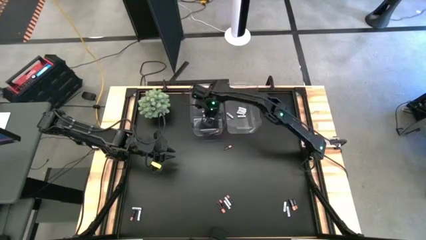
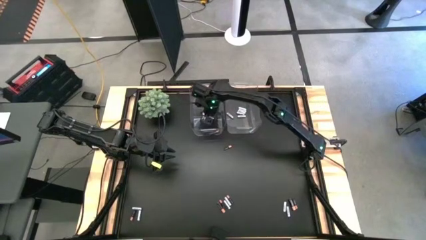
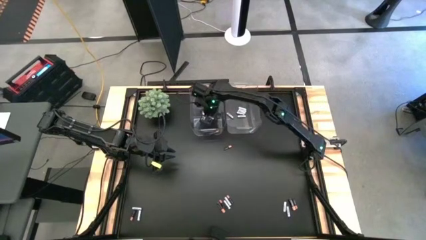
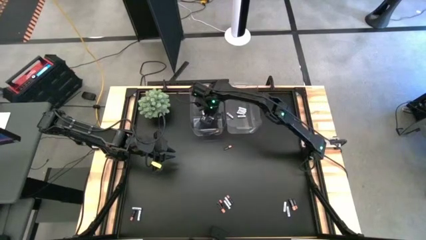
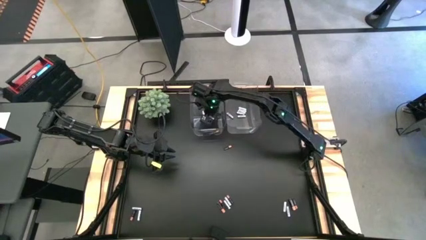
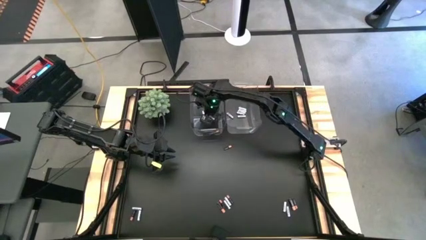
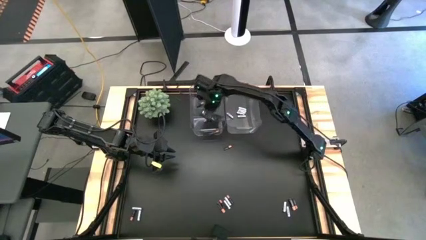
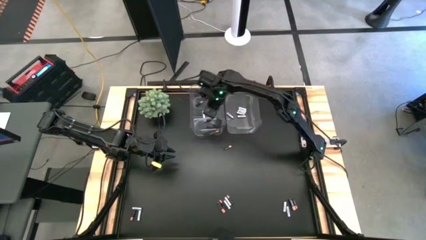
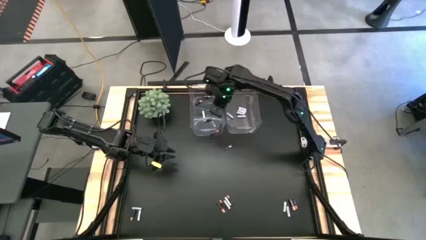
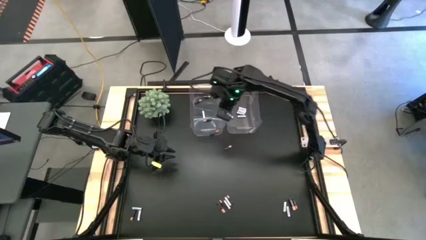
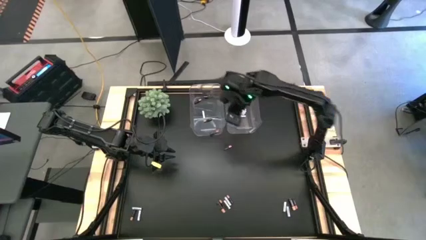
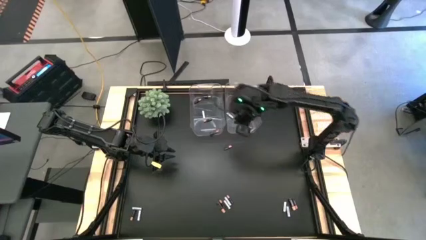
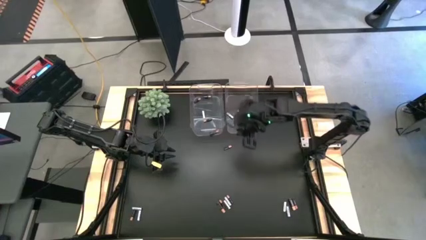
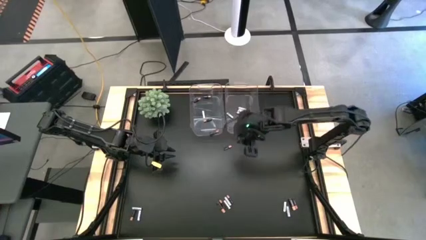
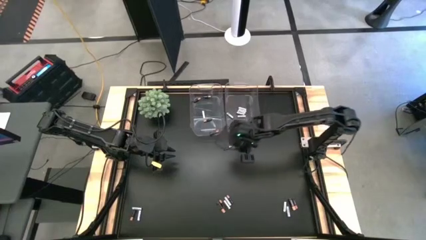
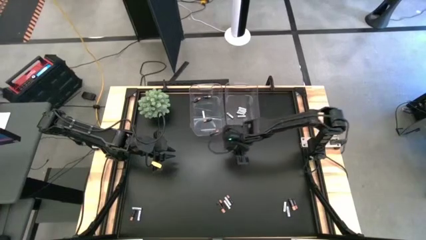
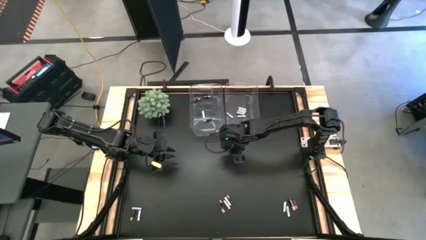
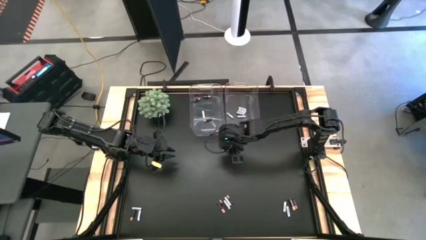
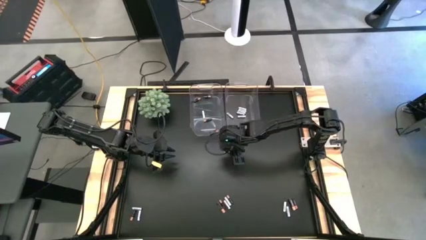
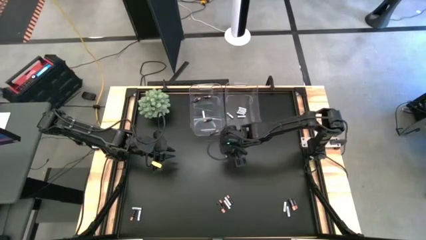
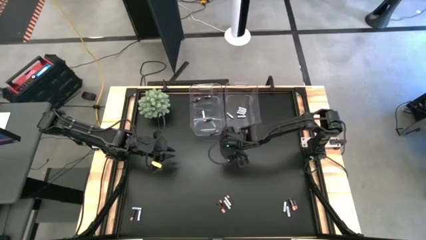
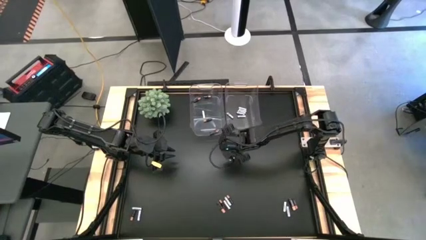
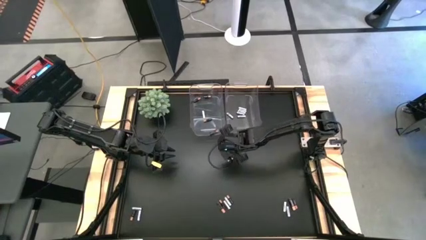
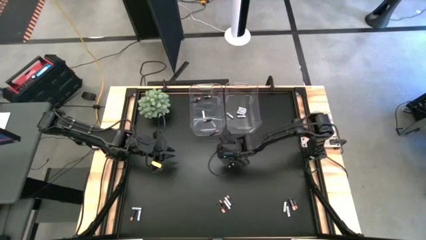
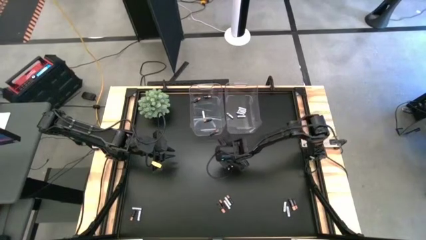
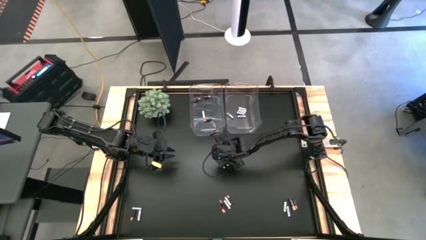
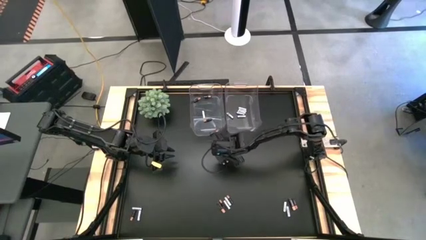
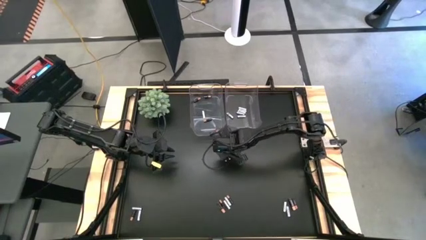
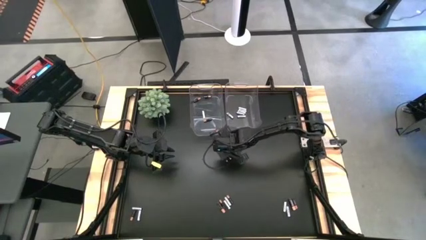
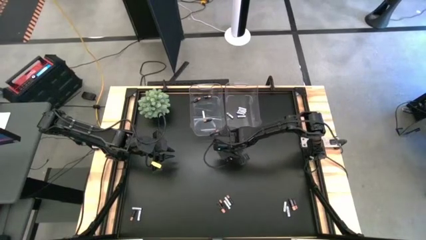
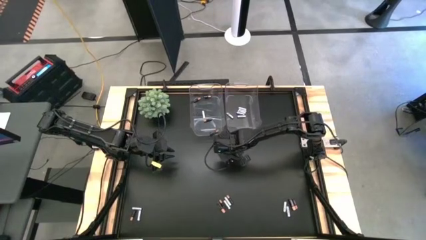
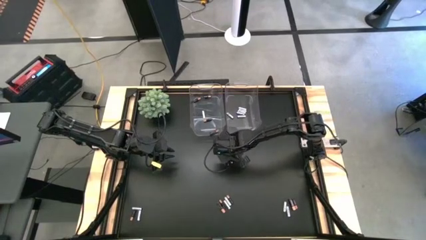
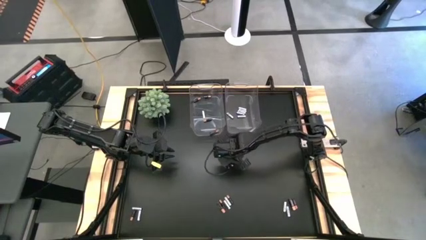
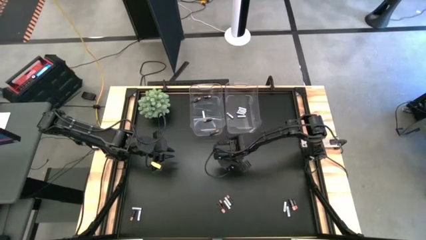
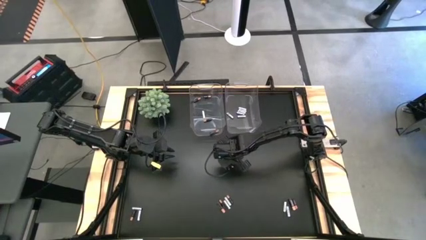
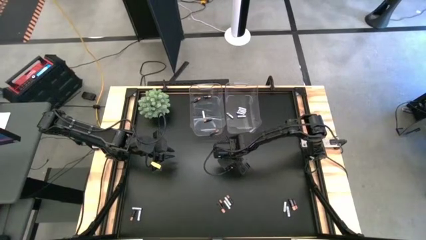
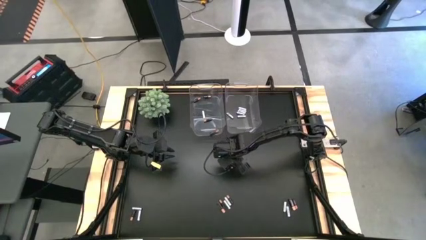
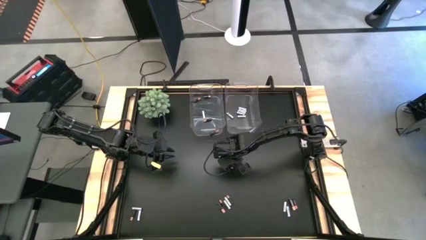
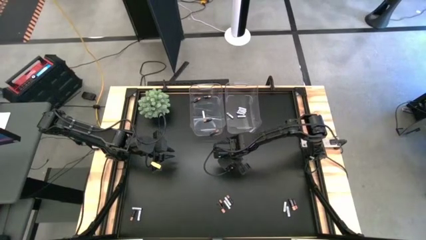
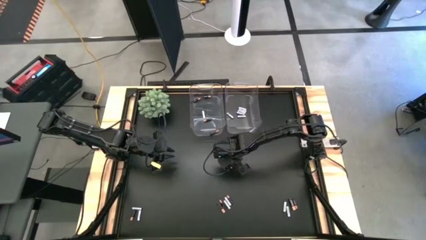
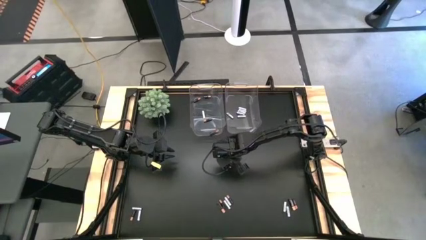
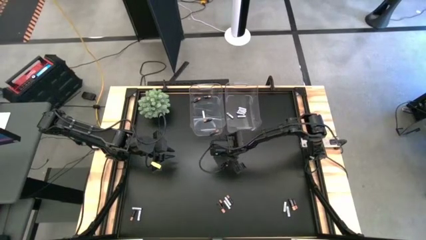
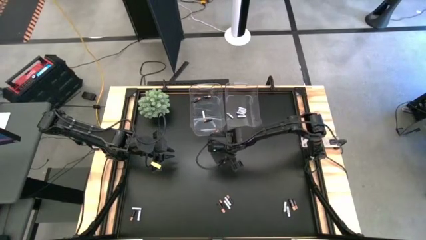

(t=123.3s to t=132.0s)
Task: Sort batteries
Put the small black battery into the left transparent bin

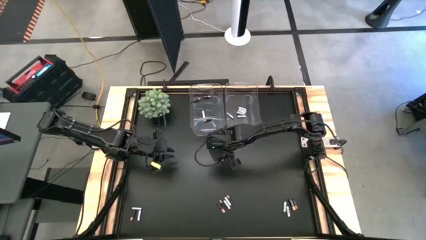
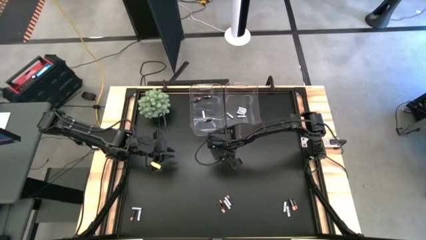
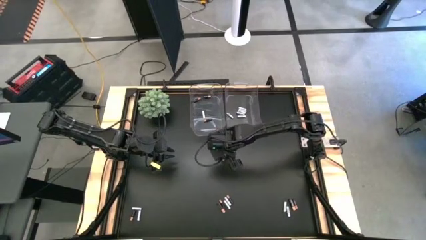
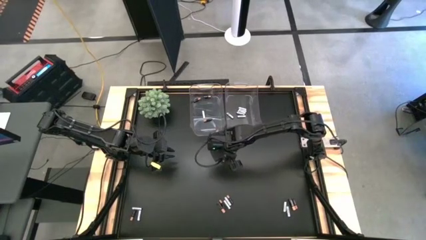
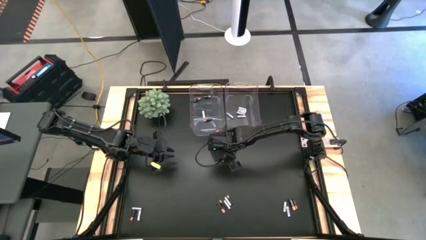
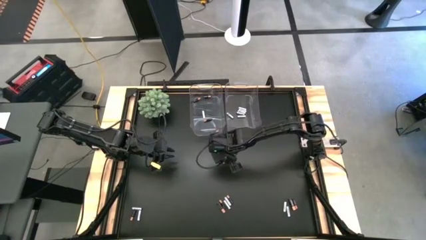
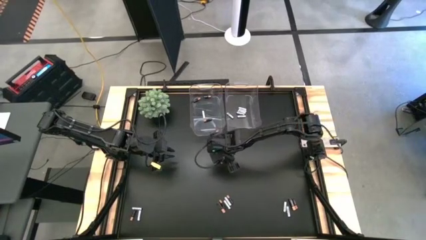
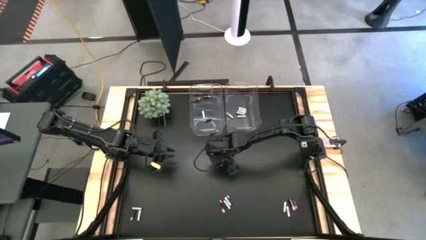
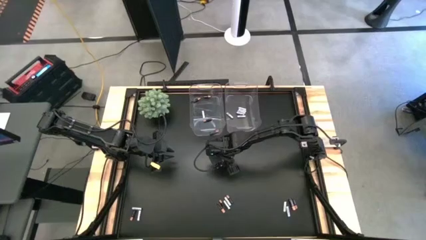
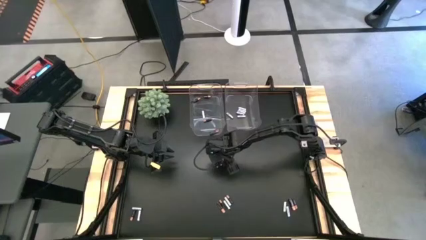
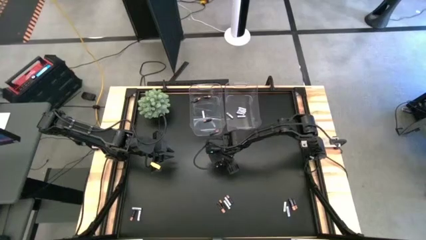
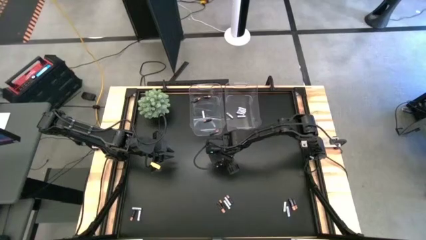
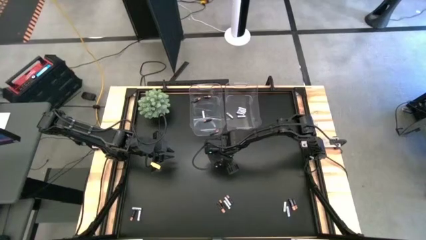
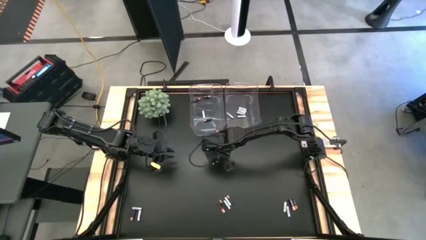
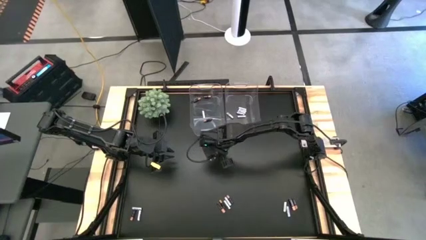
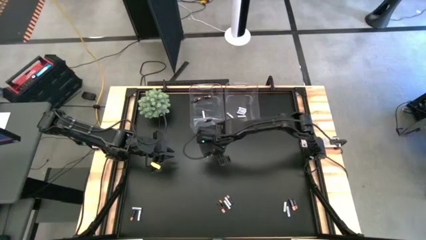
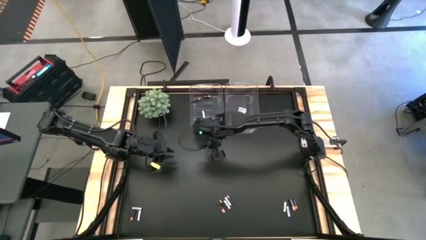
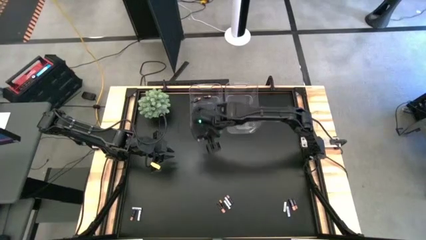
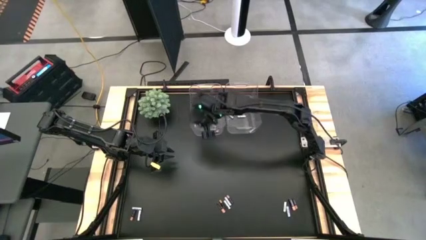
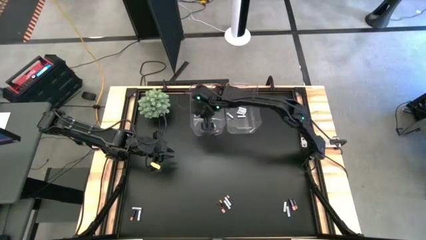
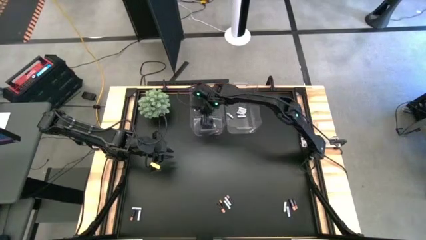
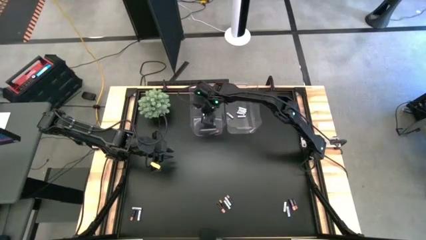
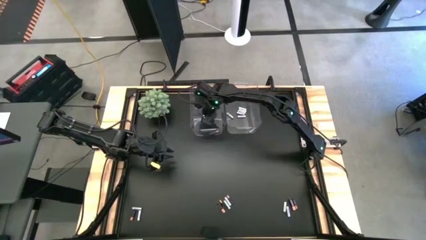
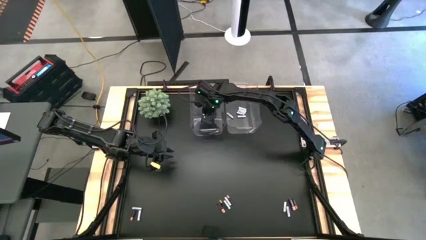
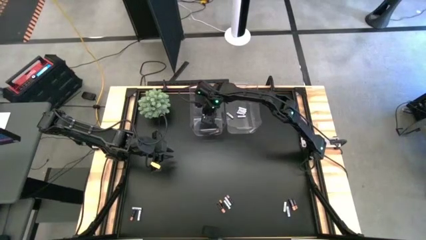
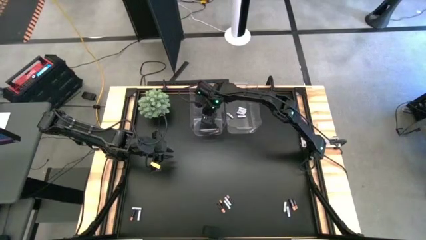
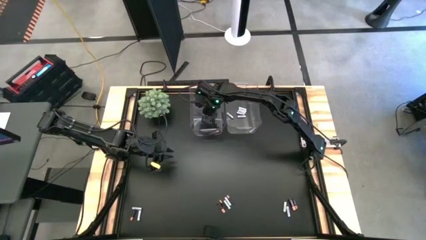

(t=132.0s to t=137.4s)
Put the small black battery into the left transparent bin

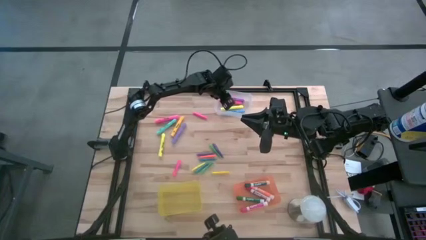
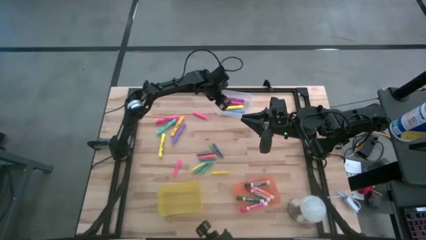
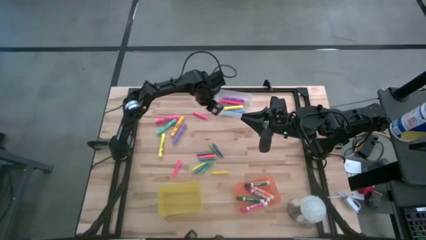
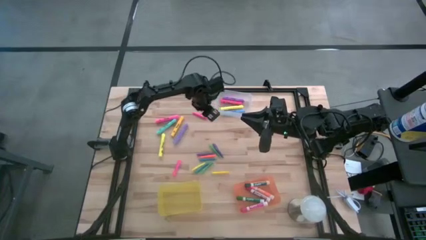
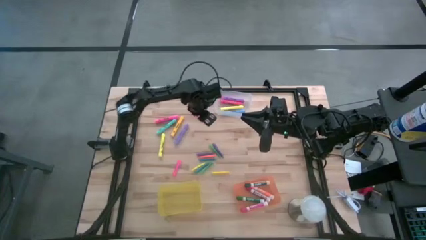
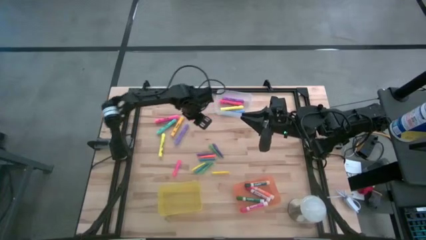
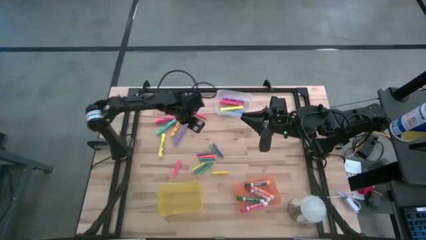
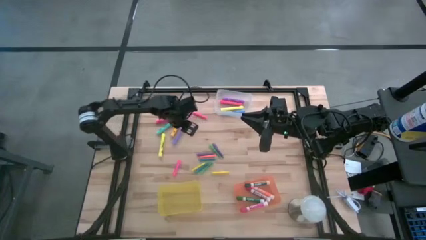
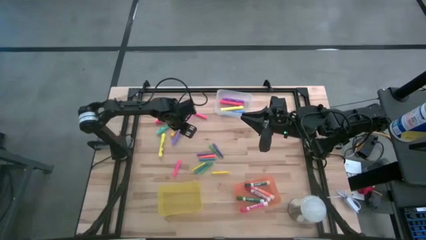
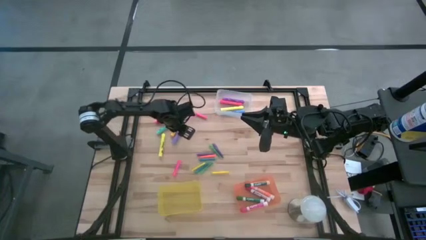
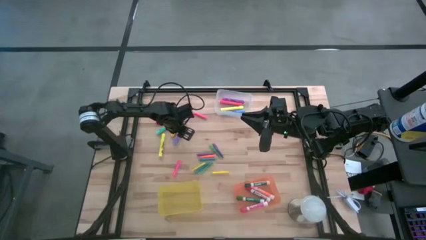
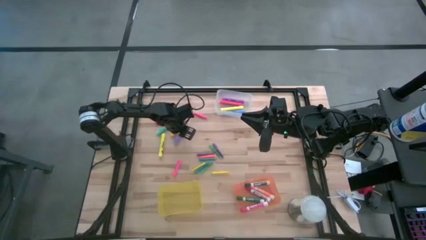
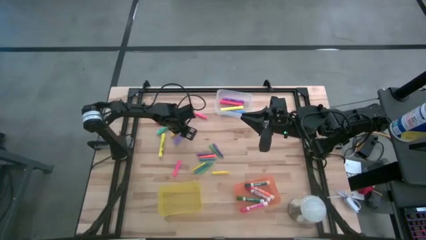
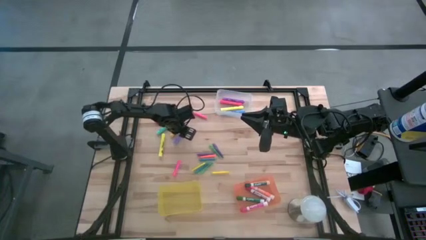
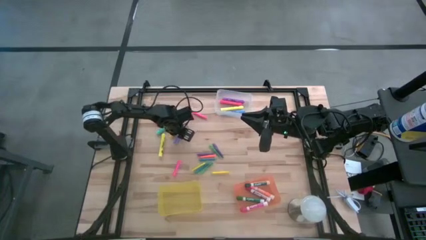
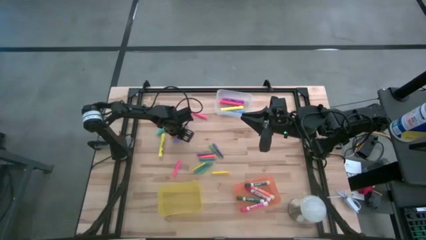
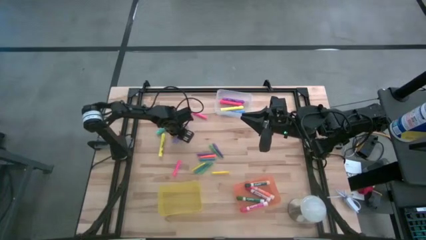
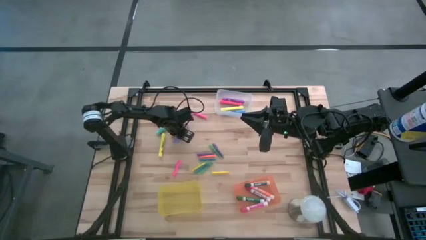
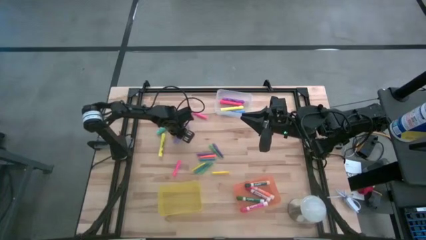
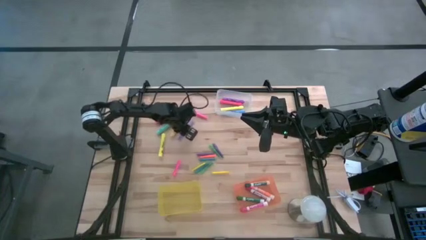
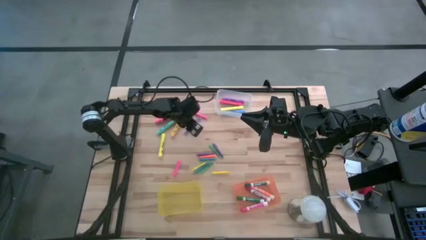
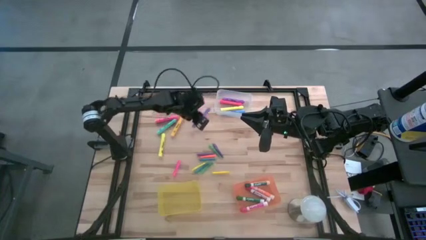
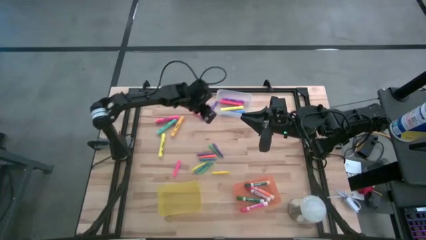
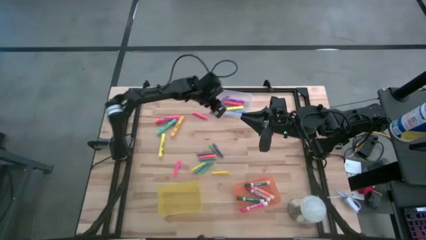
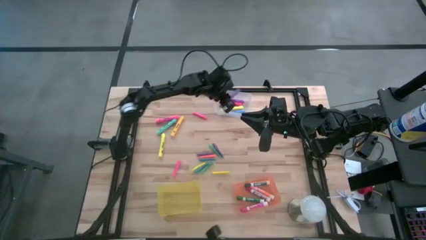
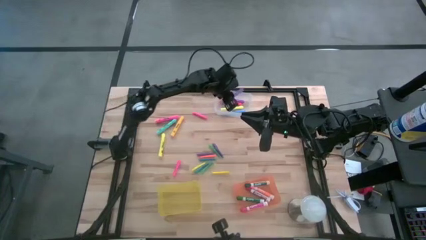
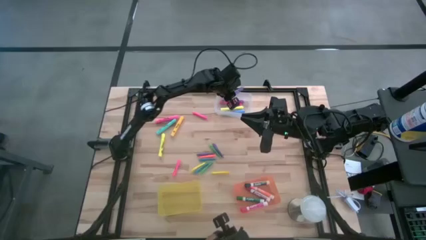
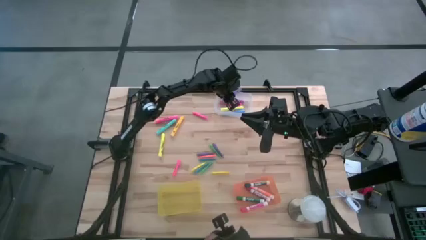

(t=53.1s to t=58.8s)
Task: Pick & Place Markers
Put the purple highlighter pen into the transparent bin
